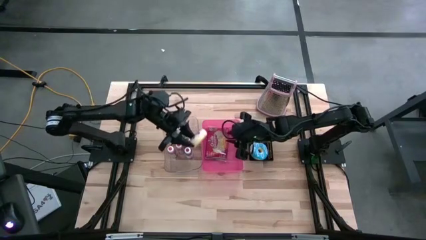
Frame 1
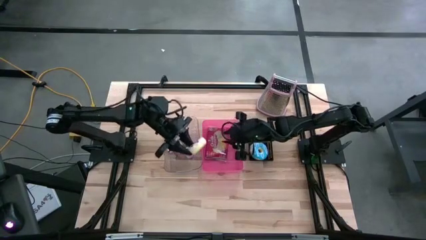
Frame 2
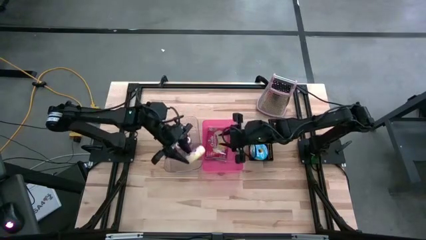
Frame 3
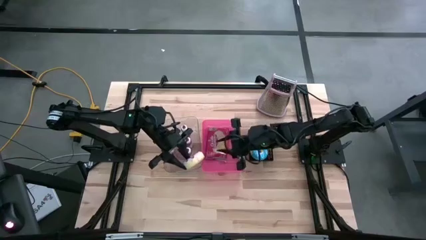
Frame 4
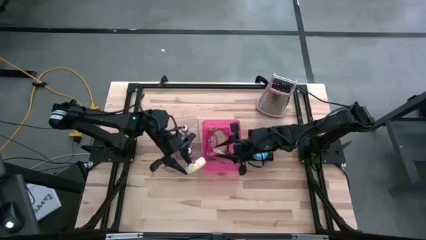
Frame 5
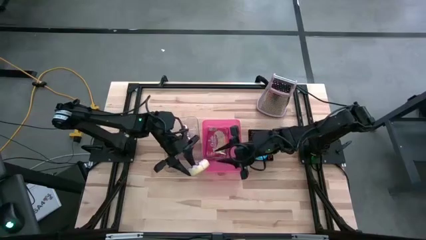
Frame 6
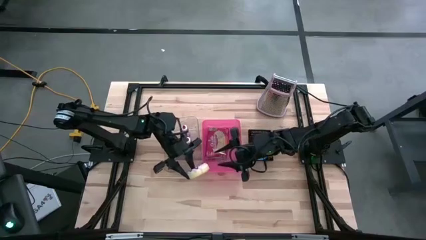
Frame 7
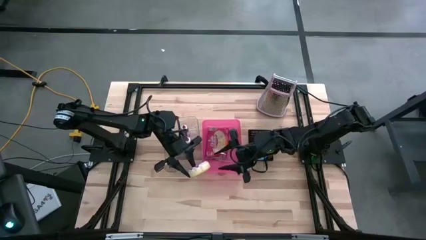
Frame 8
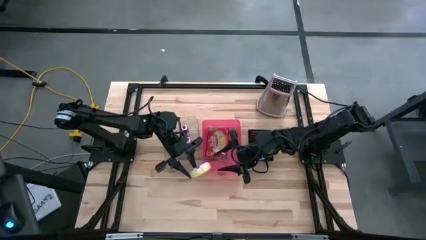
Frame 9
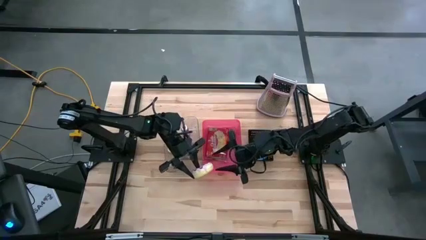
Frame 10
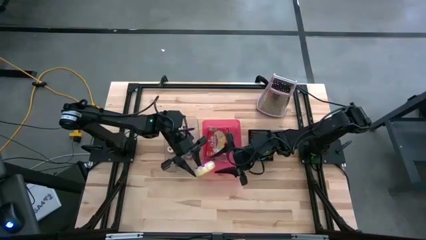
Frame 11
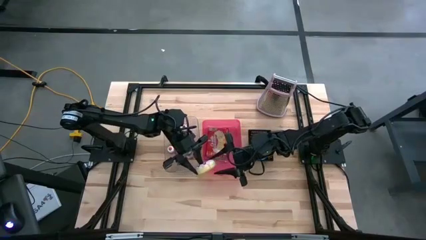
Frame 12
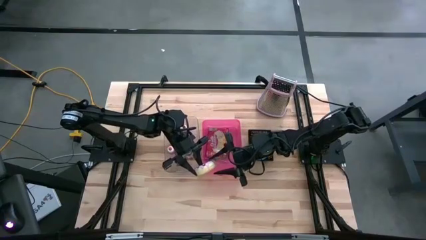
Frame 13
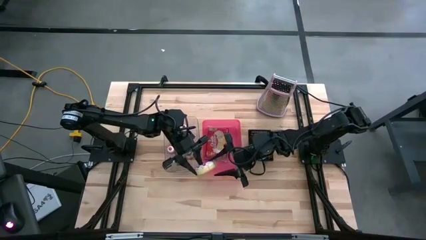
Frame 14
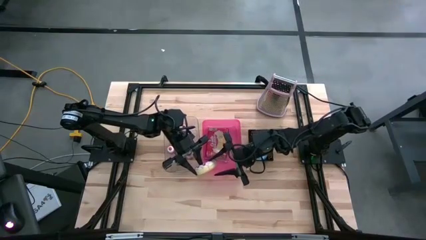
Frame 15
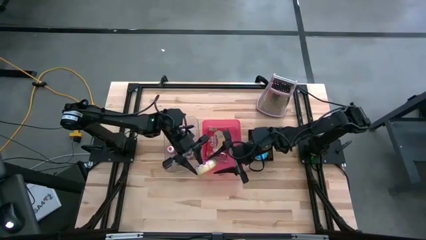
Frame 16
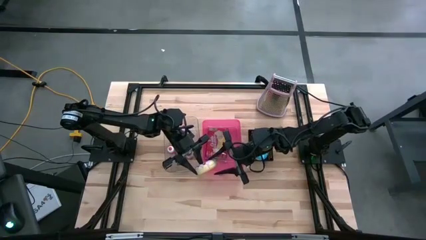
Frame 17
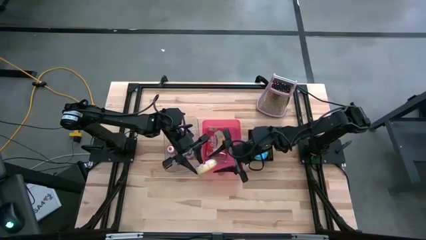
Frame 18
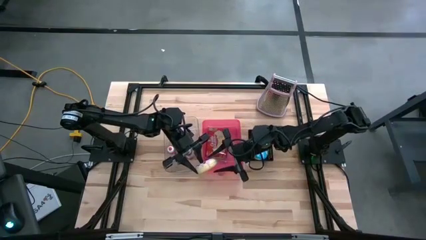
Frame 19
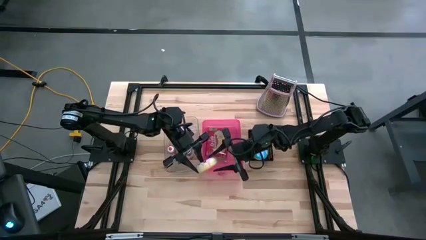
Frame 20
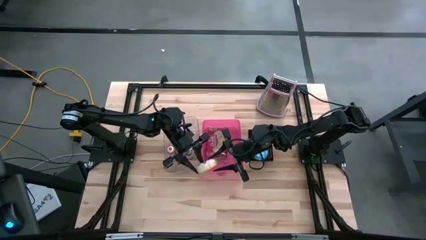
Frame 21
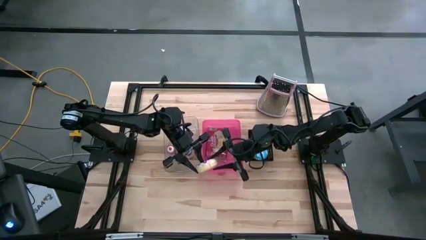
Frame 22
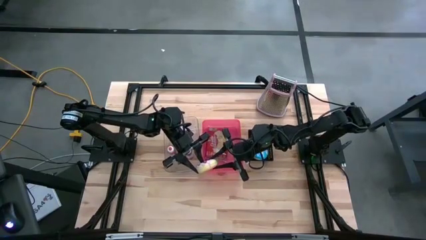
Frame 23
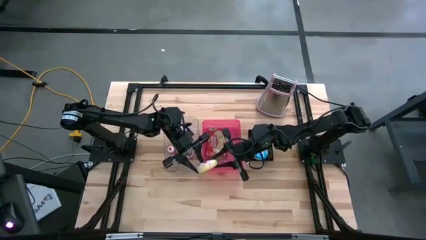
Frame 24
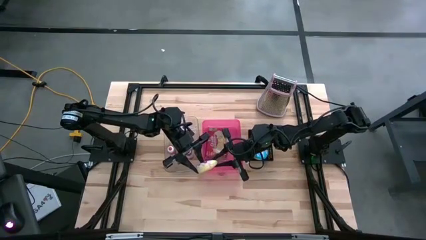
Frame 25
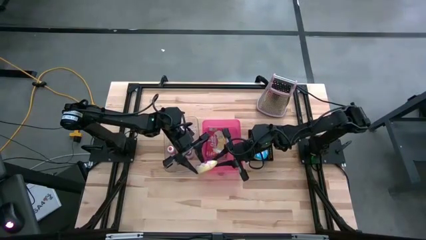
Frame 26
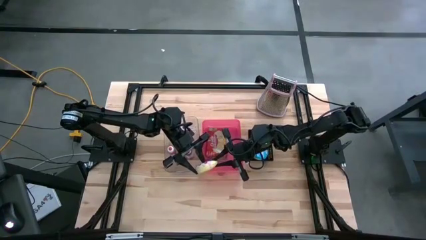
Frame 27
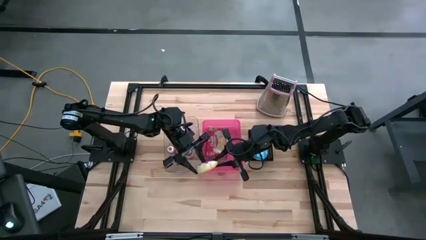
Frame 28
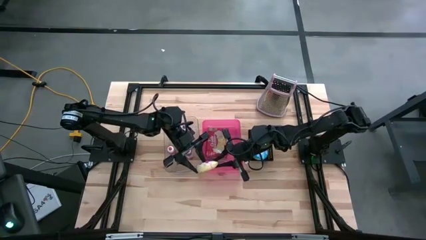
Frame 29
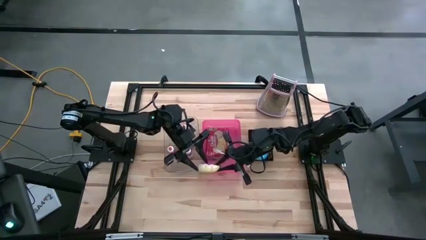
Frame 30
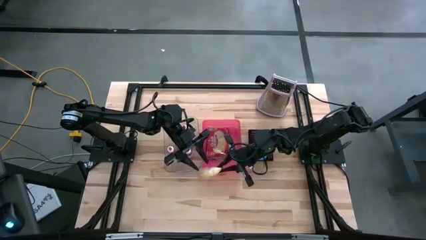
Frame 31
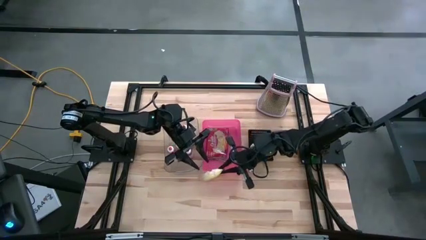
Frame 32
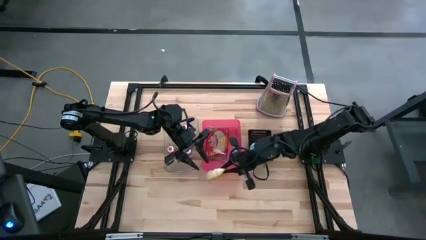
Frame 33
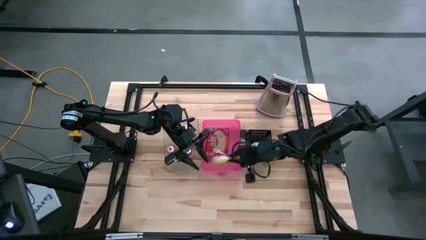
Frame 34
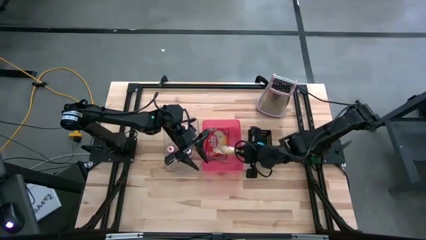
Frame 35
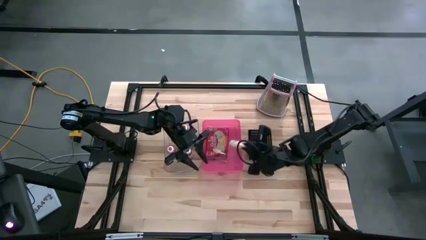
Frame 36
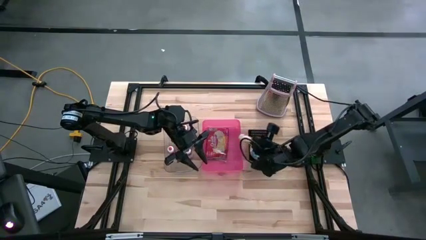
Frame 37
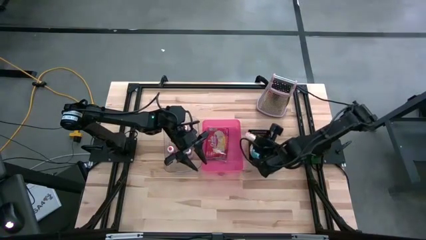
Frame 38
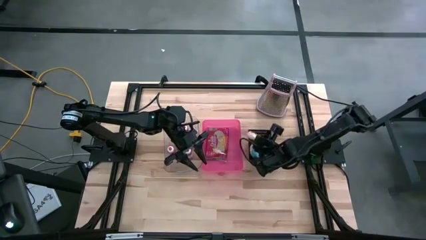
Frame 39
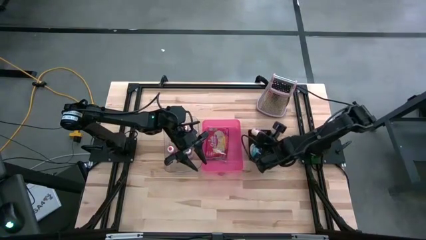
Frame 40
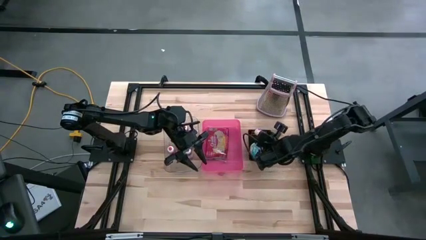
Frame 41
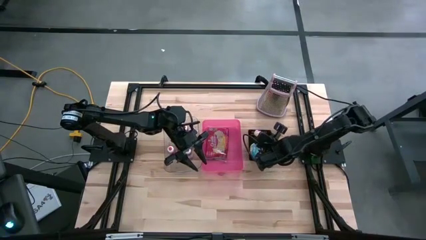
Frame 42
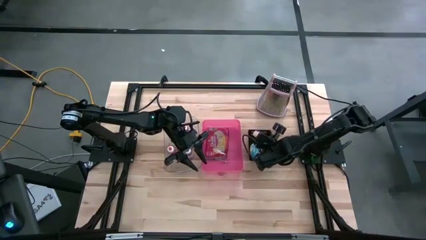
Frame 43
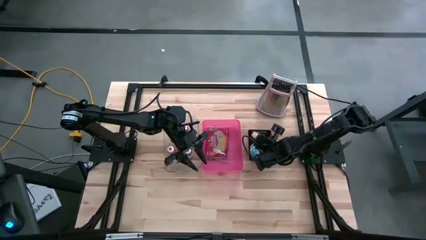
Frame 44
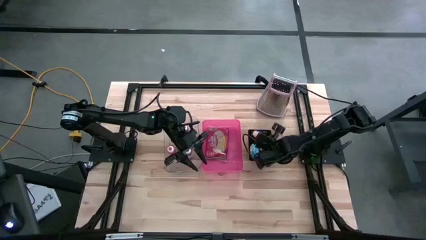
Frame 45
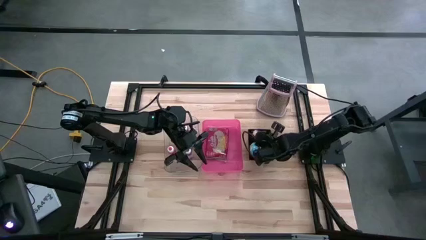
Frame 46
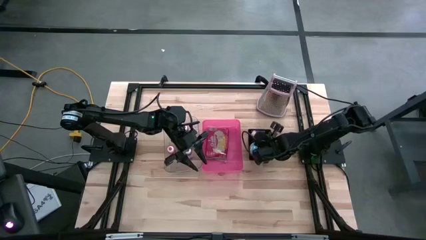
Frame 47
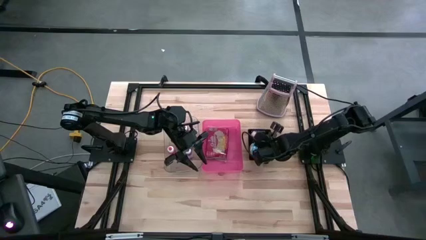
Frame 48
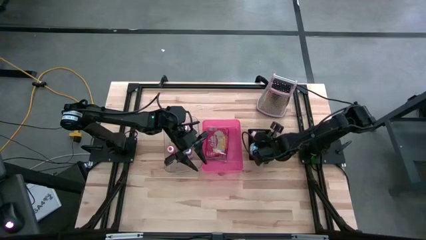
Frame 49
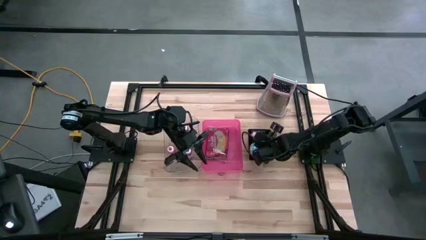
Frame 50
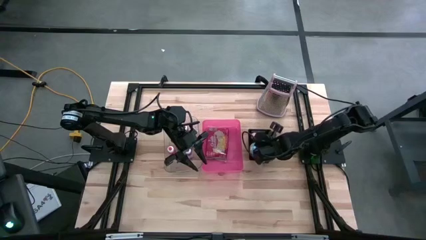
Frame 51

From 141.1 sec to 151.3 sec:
Task: Pick & Place Food Item
Put the violet donut into the black bin

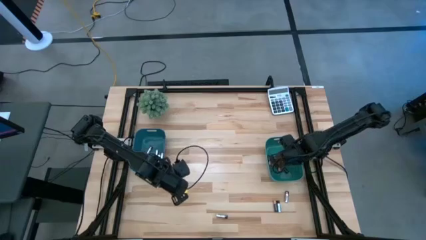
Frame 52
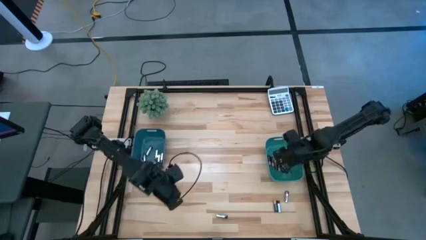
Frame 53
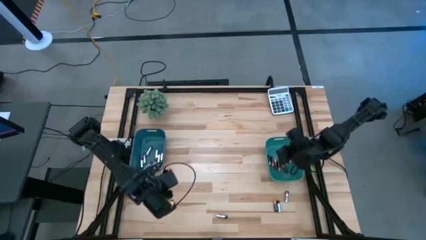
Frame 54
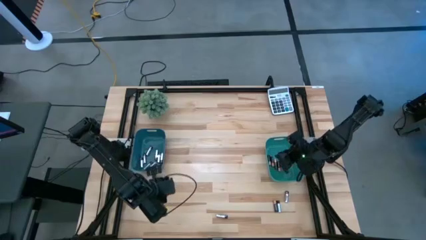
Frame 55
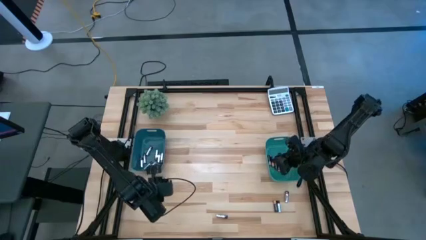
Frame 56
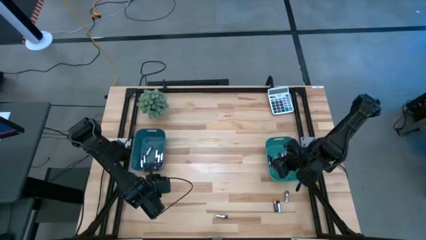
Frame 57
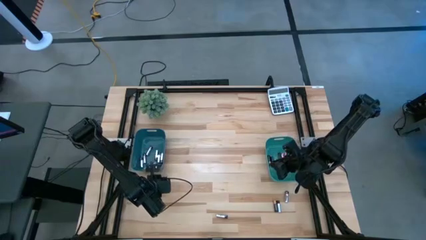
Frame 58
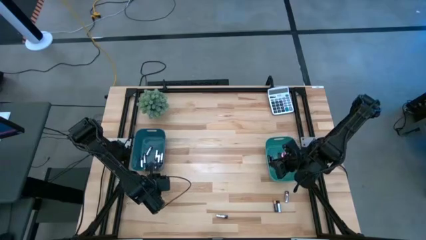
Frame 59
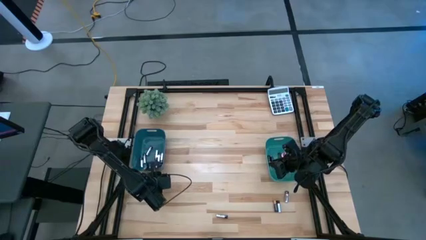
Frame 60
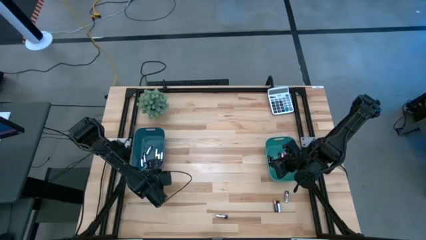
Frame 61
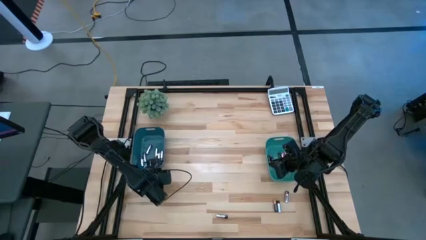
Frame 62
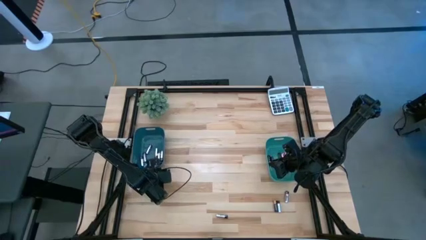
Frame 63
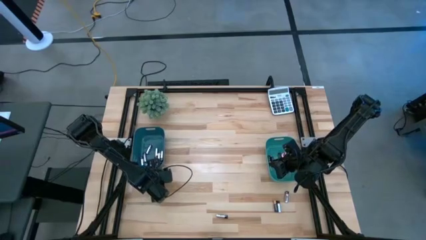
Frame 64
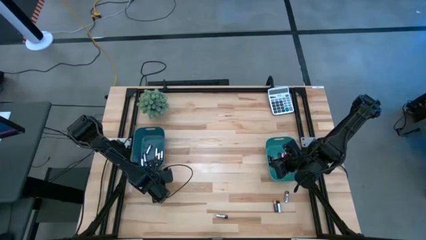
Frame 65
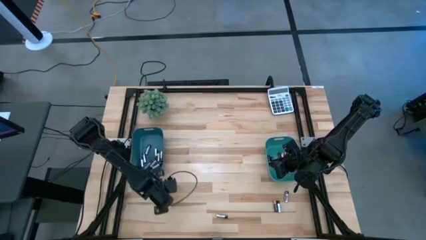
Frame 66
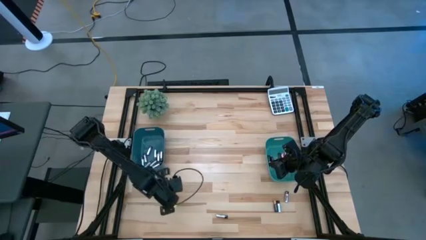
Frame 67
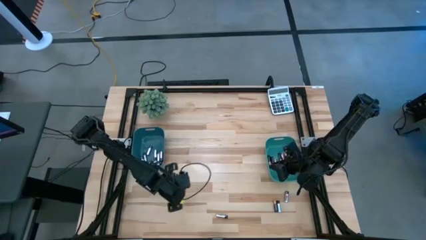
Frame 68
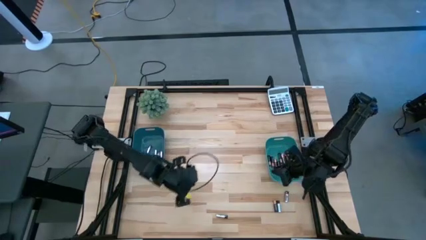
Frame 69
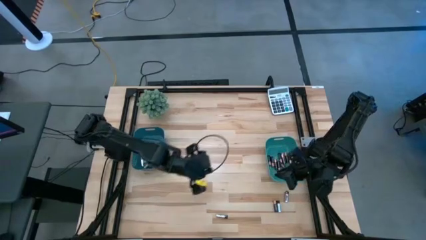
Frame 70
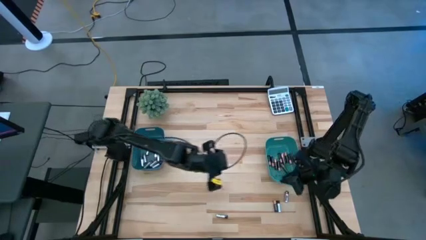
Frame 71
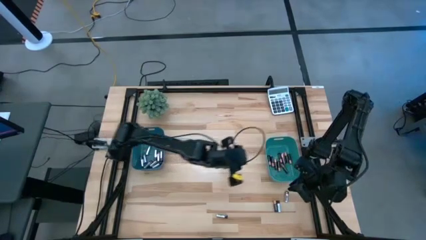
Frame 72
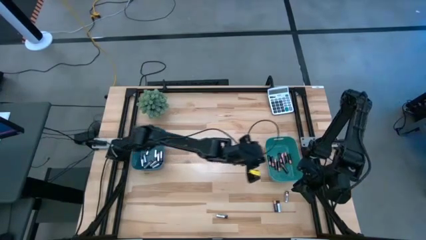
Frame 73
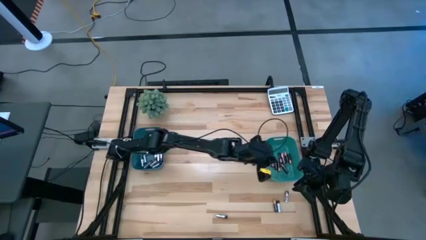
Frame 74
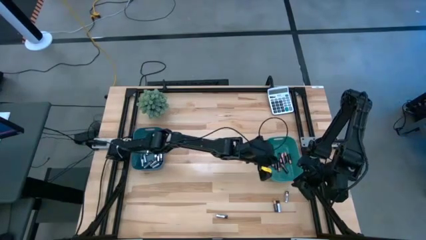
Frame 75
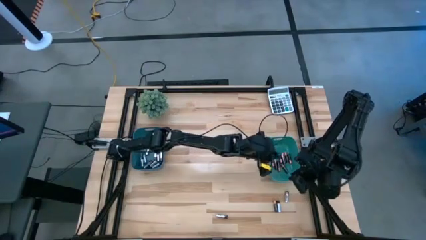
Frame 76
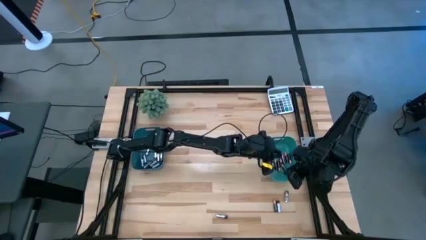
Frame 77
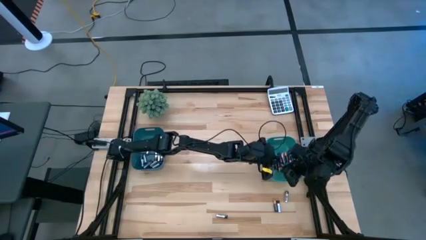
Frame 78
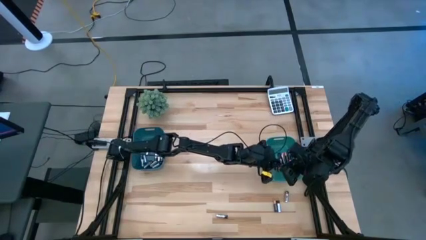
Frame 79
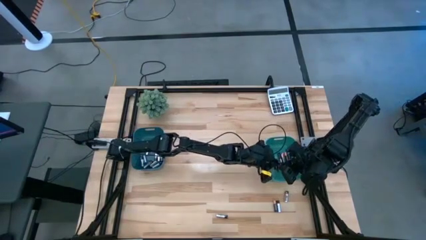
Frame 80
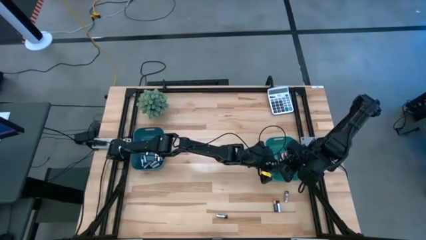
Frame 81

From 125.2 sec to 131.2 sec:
Task: Sort batteries
Put the black battery into the green bin
